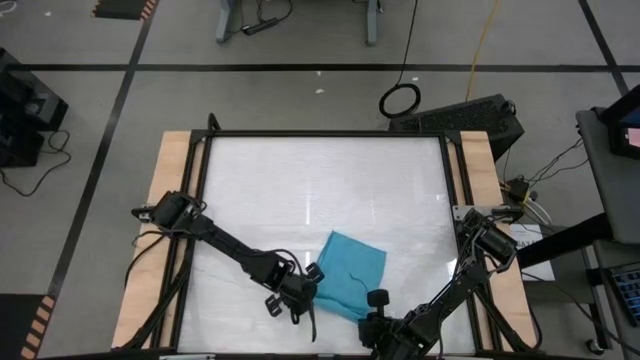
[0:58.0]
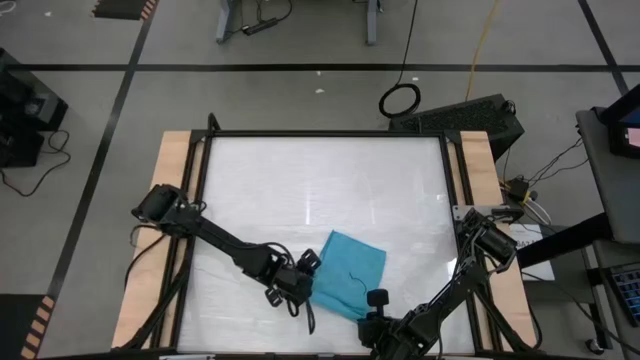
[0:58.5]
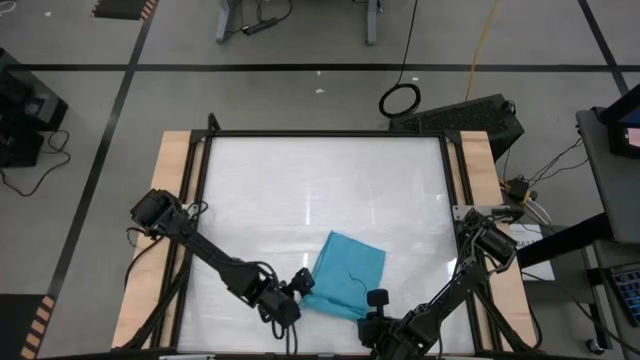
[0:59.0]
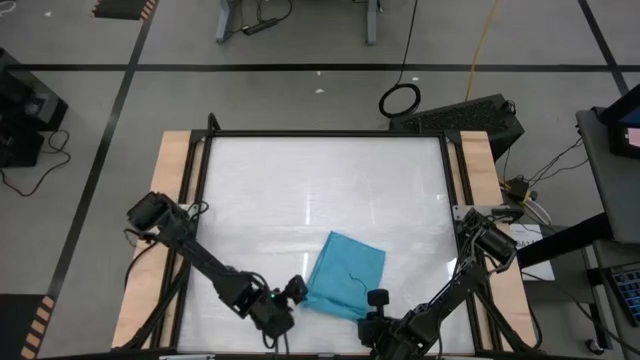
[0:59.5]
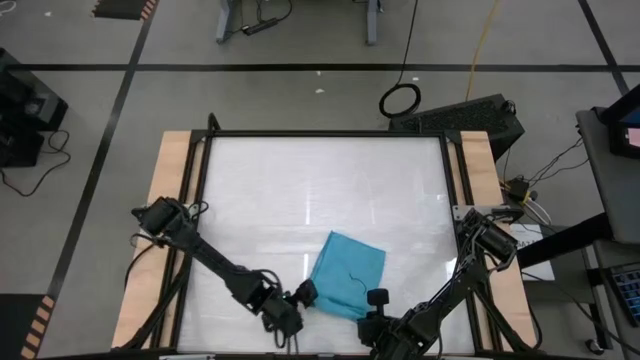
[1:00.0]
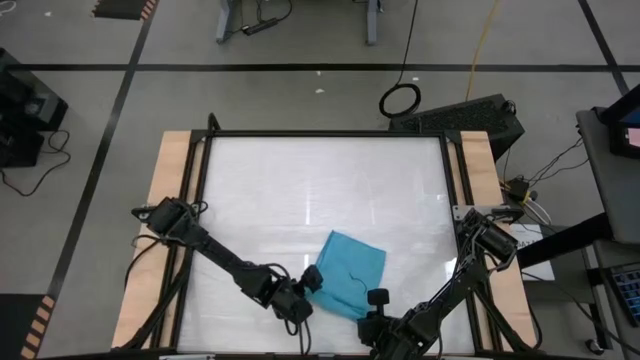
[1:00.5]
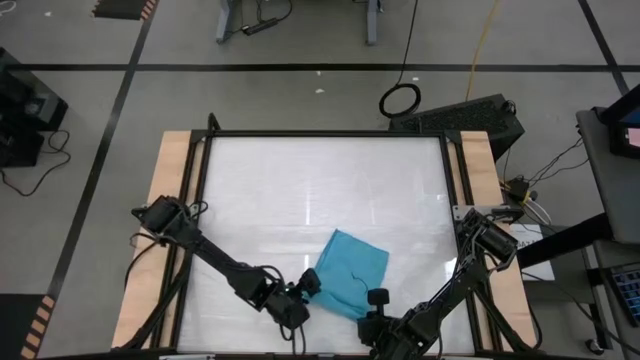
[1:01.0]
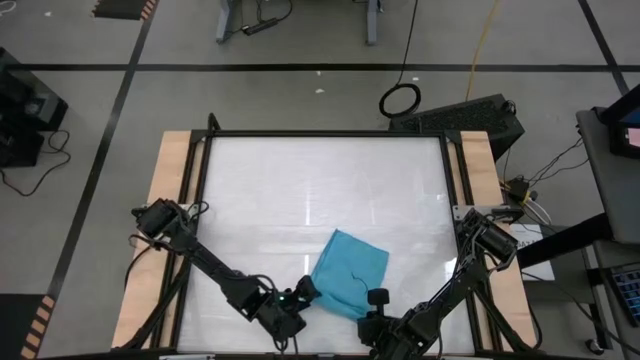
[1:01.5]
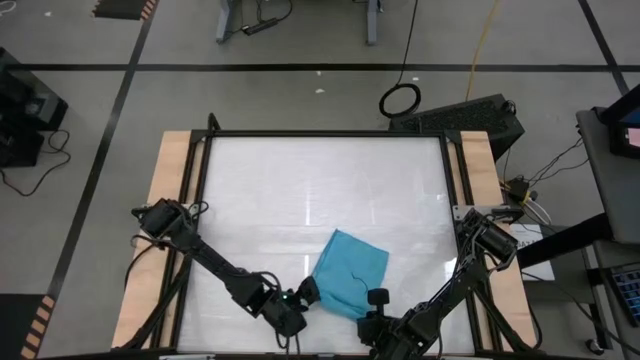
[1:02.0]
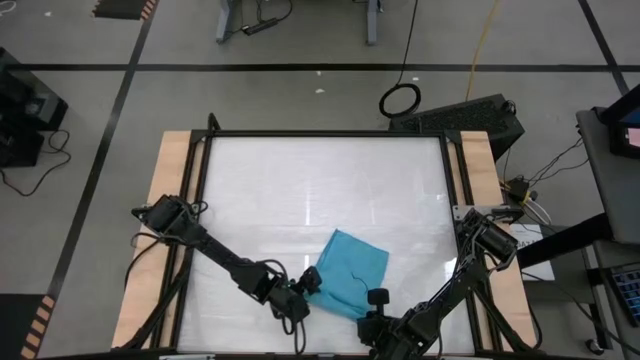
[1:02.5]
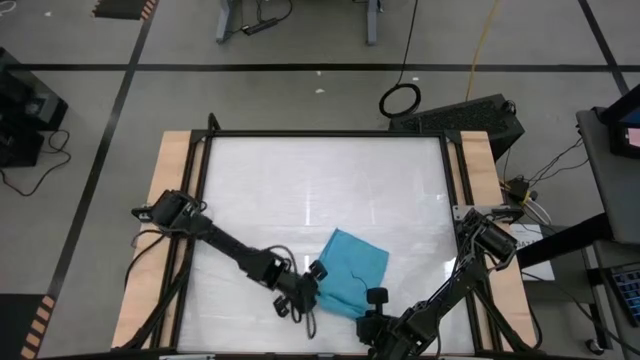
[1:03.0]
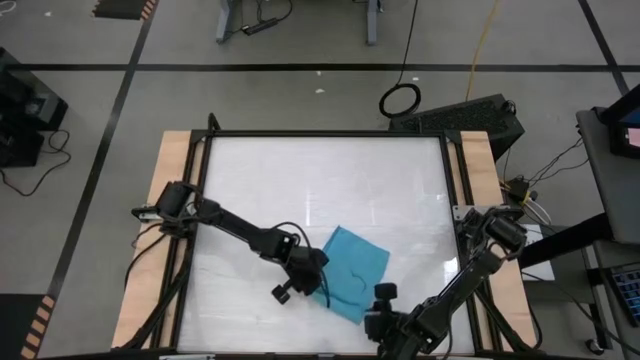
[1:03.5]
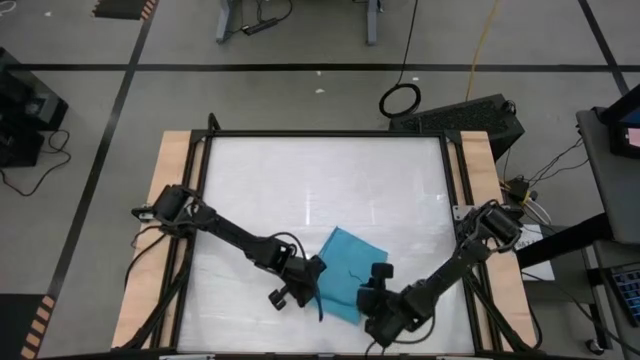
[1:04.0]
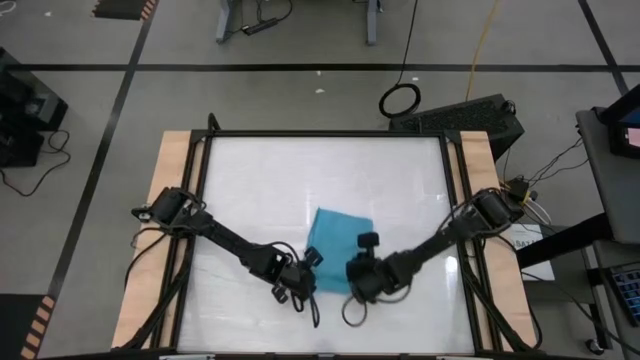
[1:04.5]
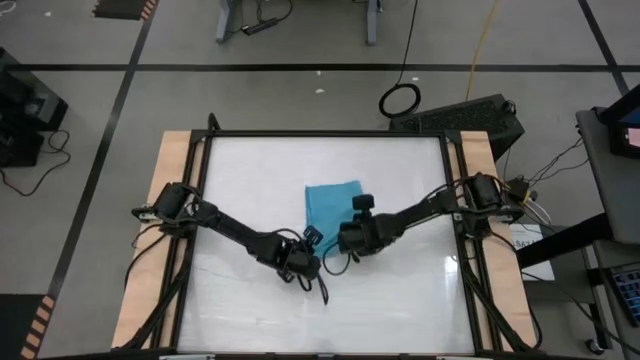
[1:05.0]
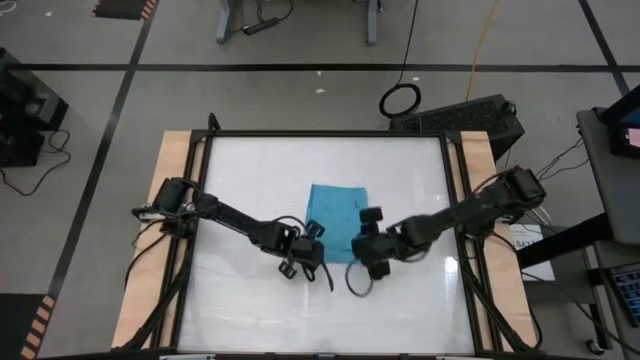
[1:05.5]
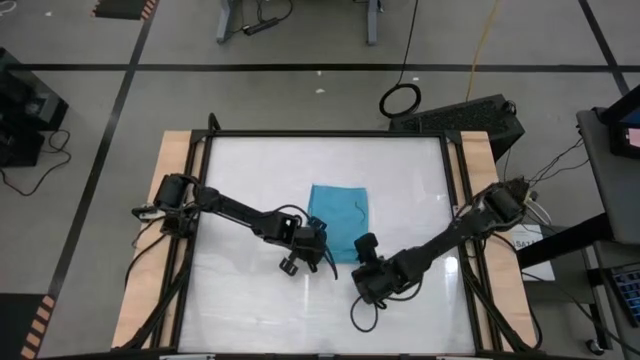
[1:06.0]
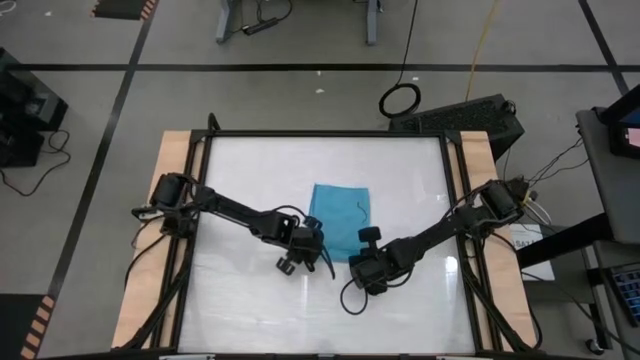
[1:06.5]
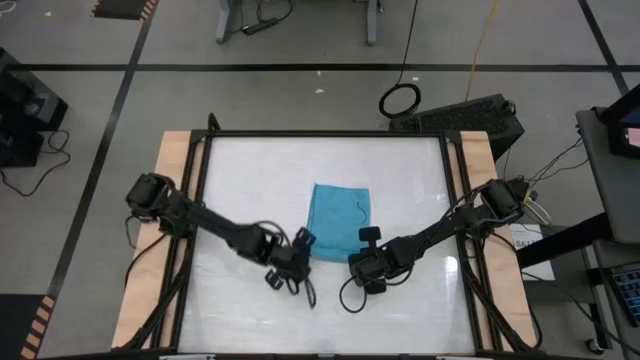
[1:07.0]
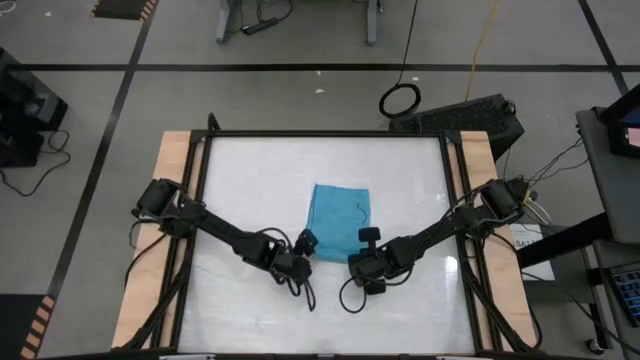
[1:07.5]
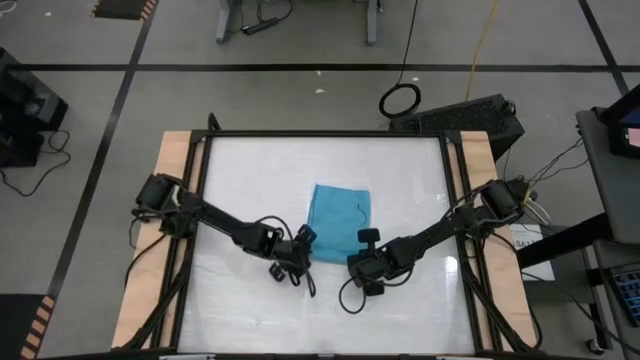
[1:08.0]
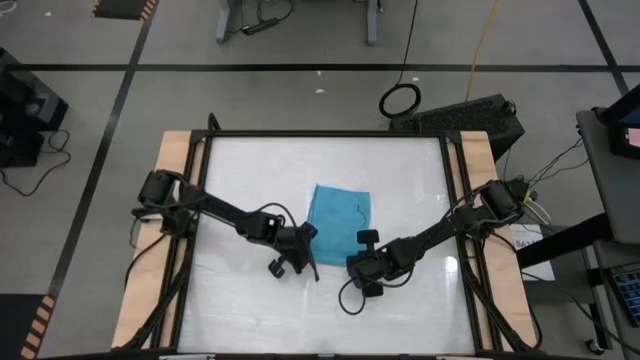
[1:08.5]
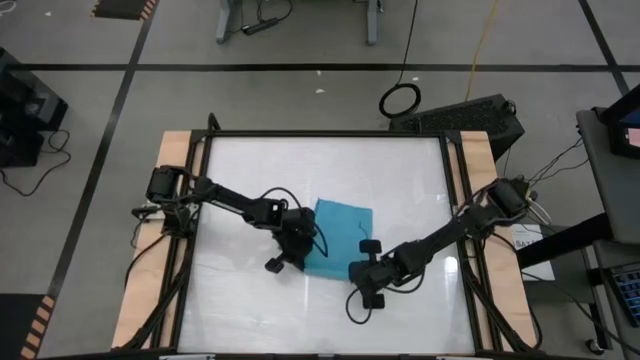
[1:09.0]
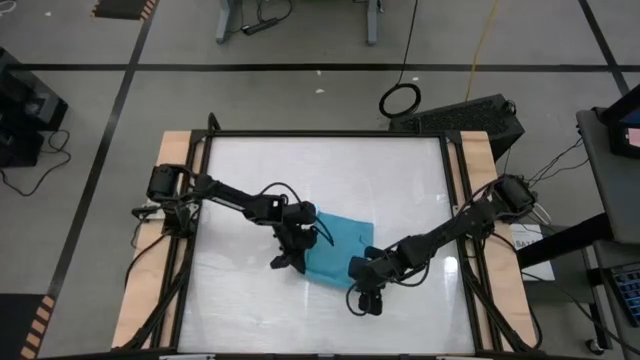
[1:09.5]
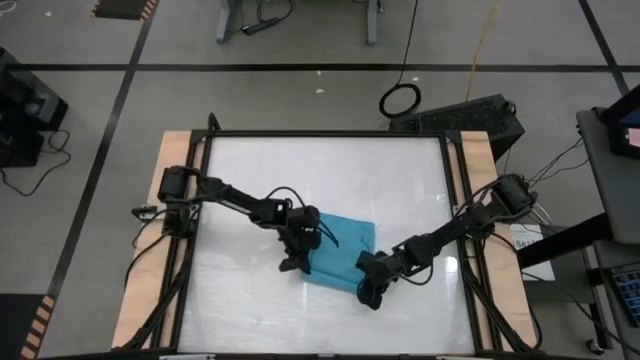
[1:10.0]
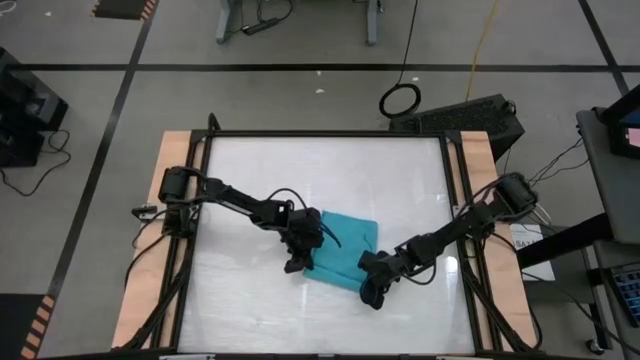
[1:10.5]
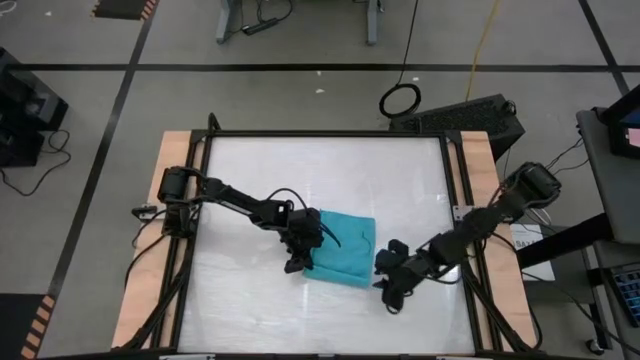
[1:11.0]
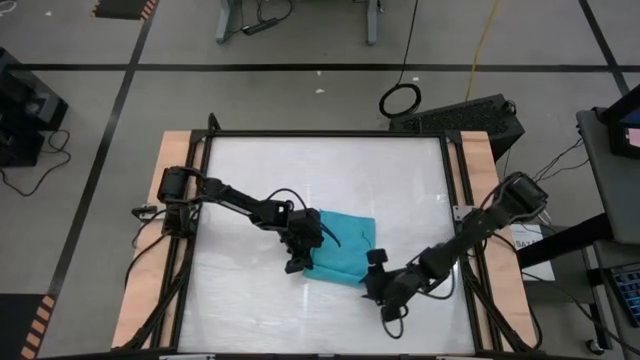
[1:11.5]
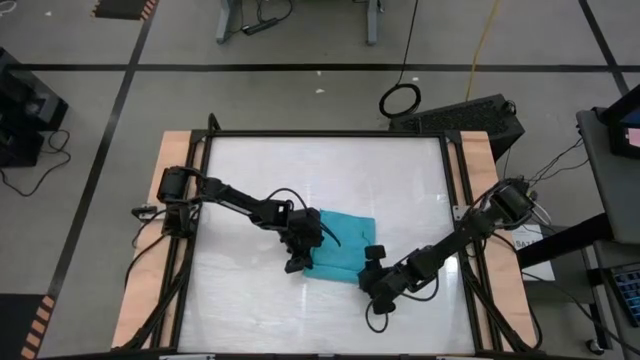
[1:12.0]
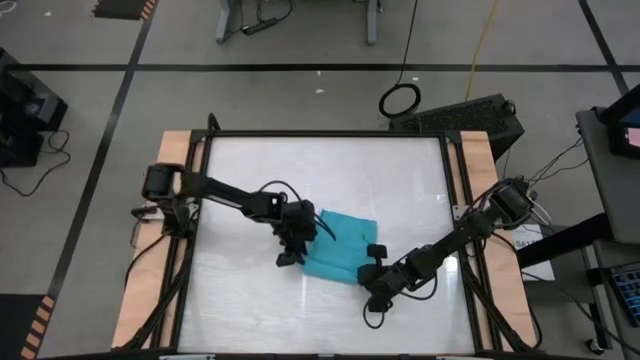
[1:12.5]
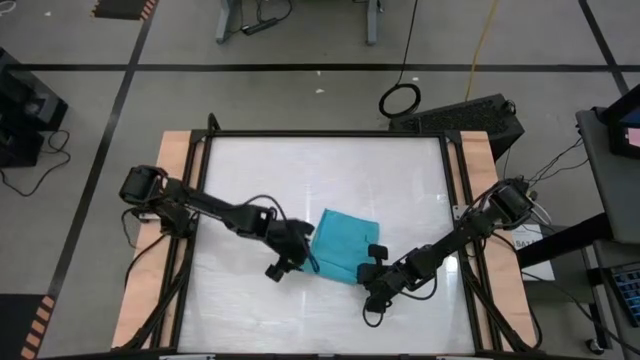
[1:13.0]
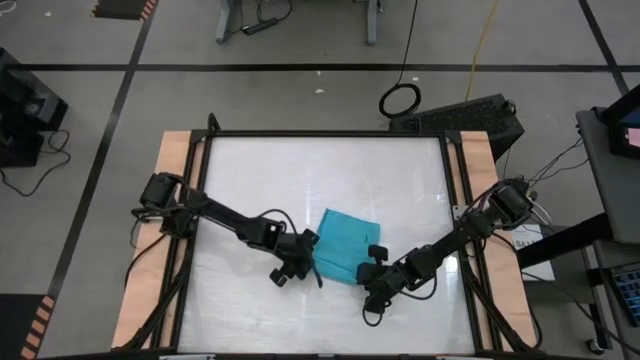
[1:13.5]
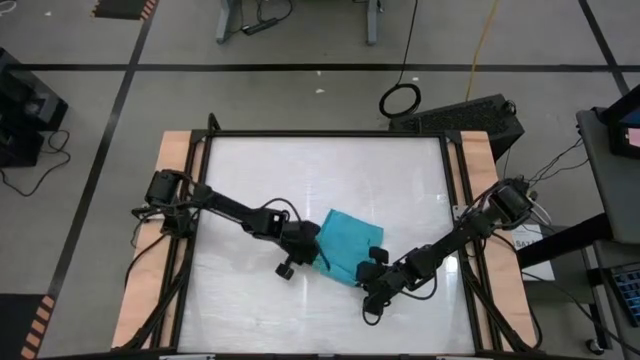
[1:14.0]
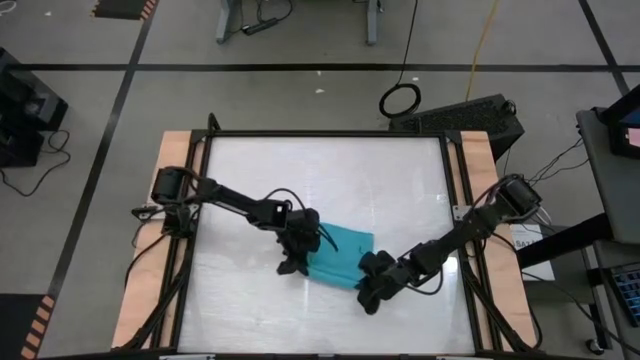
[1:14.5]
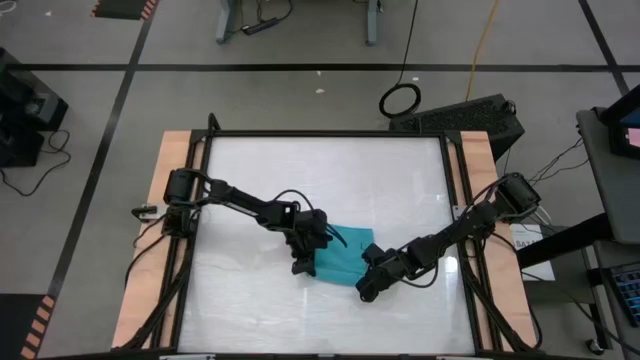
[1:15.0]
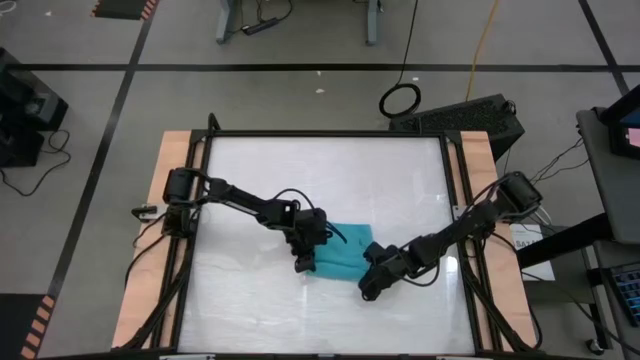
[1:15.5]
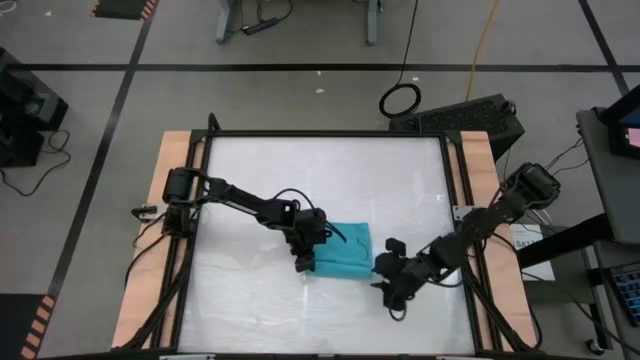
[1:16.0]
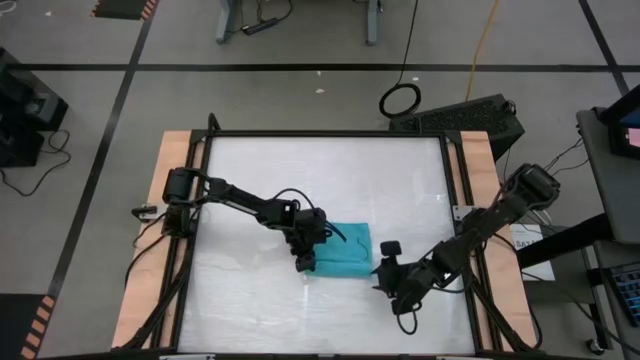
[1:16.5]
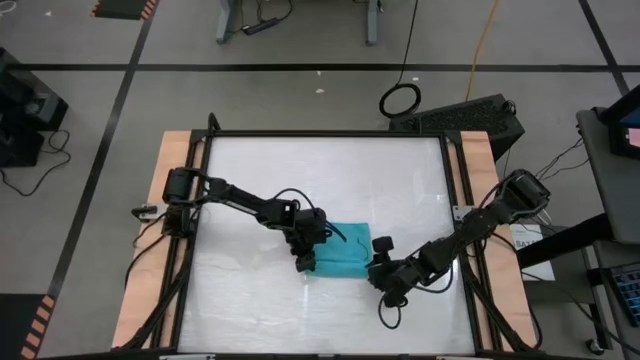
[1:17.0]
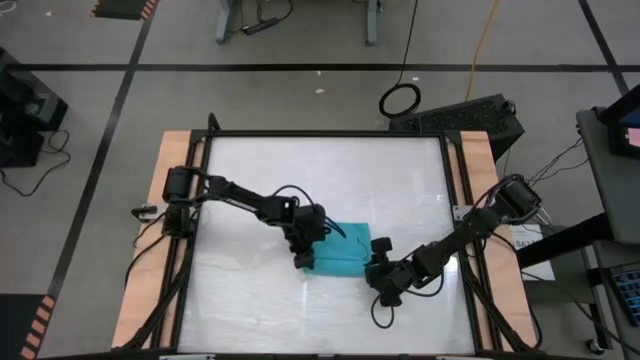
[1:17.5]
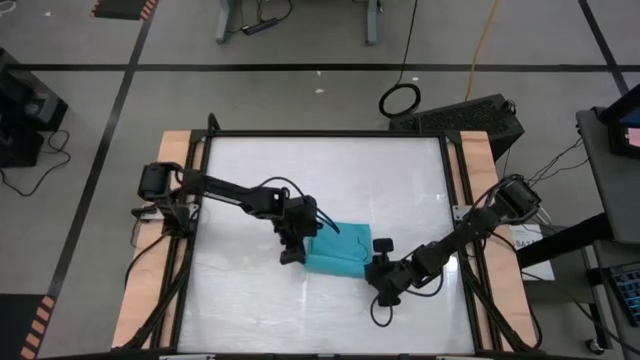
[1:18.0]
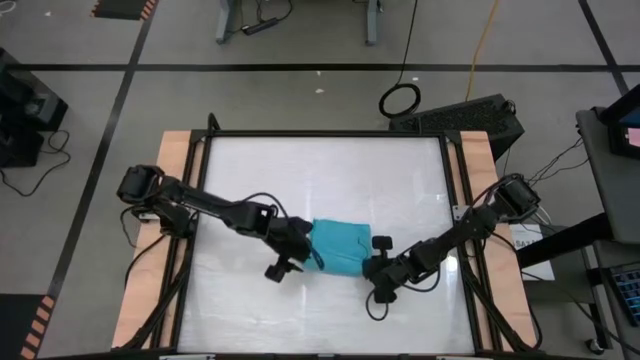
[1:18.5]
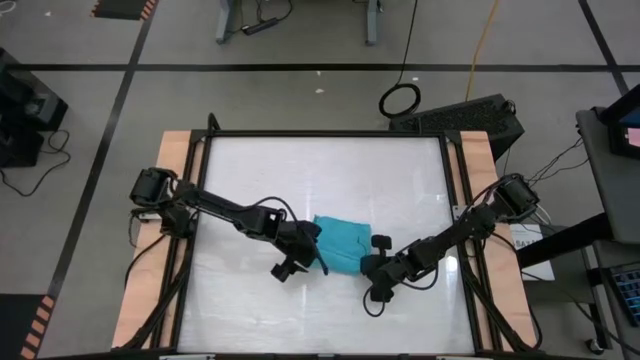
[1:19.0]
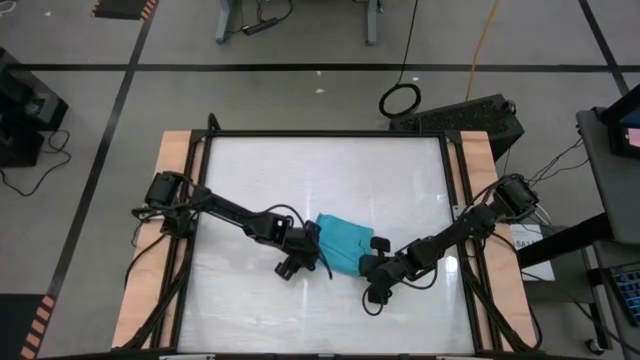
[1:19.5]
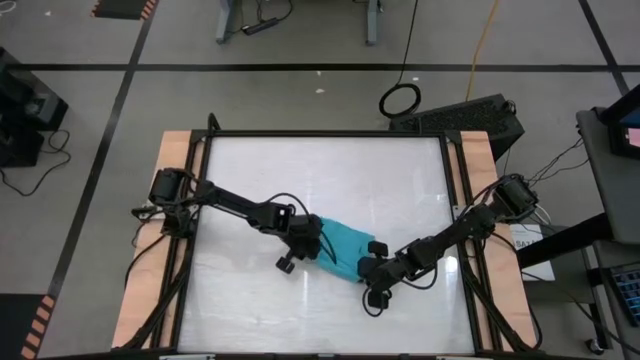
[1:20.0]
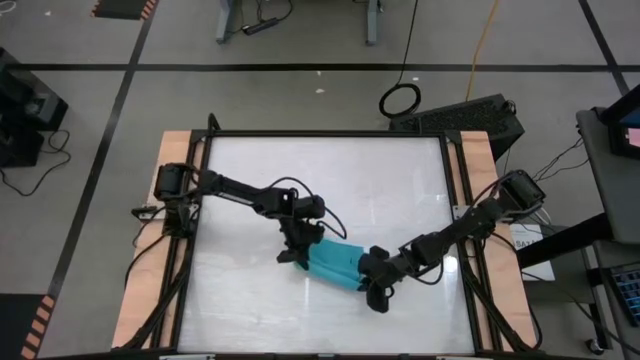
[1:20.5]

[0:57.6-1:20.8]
Task: Roll towel
Roll the blue towel
